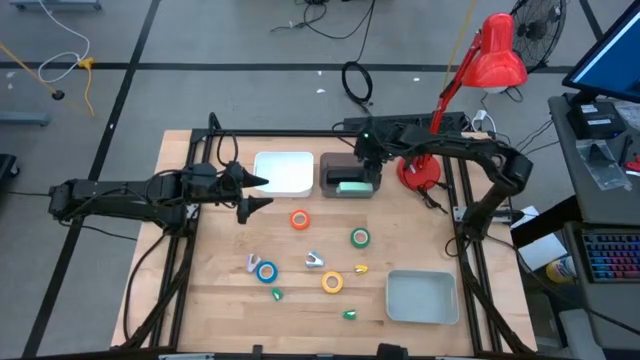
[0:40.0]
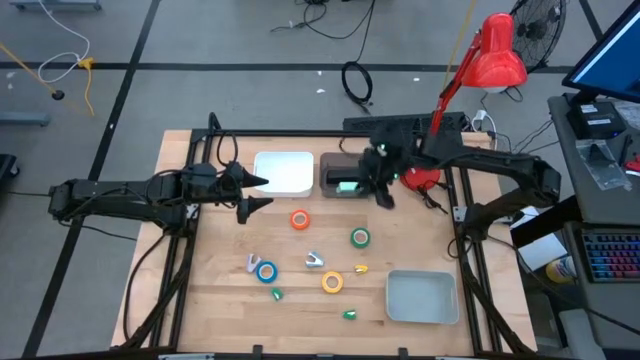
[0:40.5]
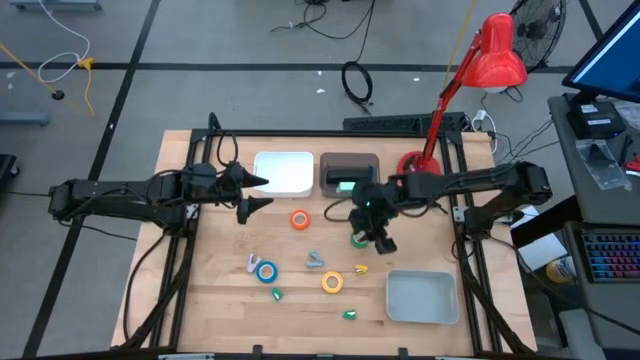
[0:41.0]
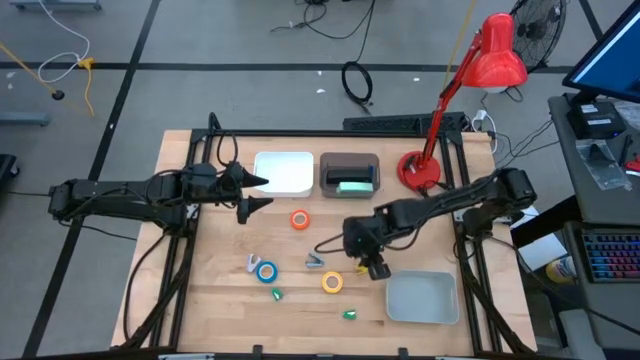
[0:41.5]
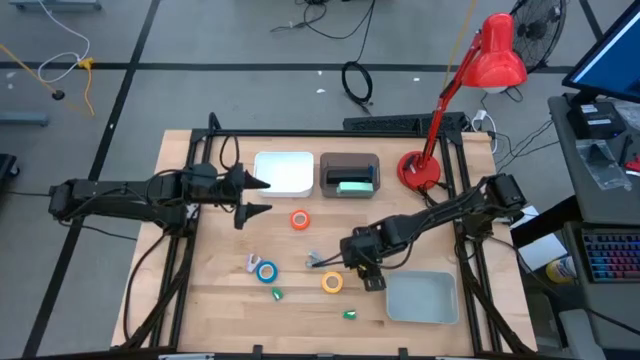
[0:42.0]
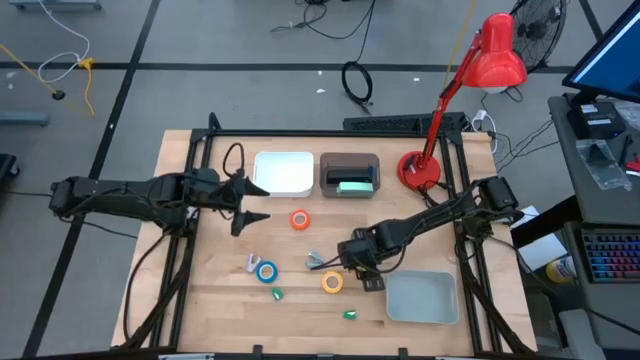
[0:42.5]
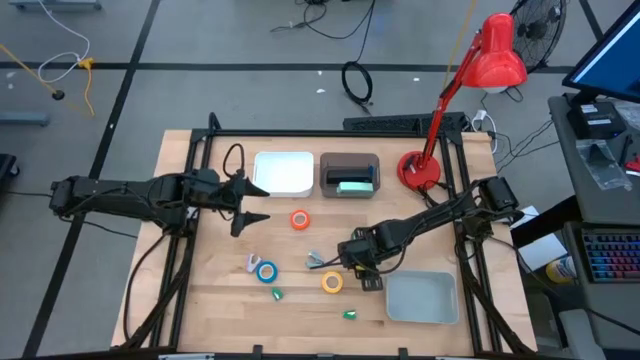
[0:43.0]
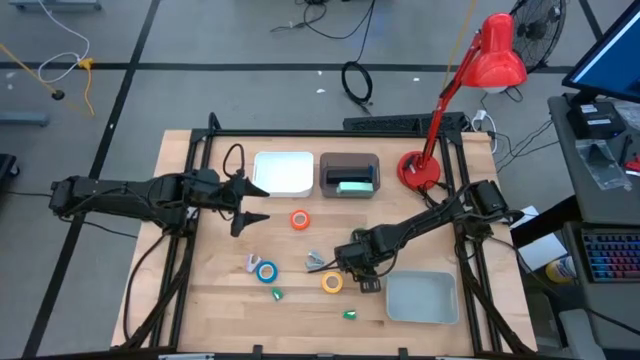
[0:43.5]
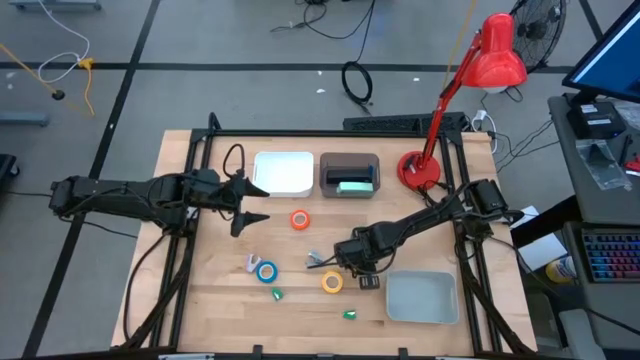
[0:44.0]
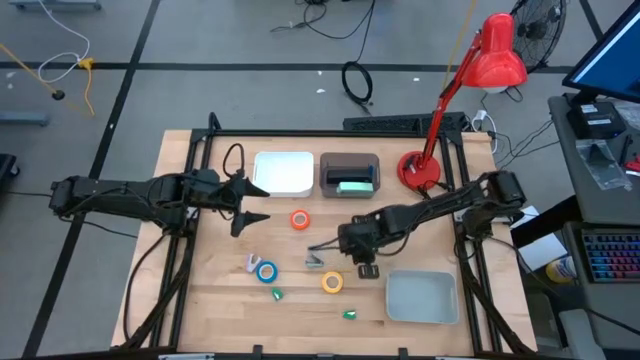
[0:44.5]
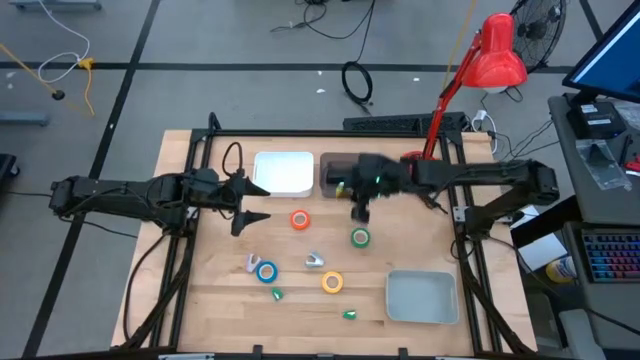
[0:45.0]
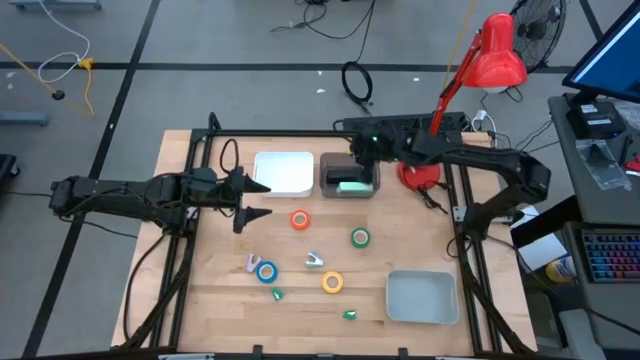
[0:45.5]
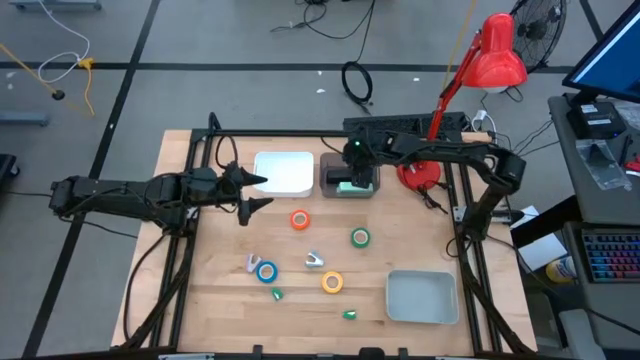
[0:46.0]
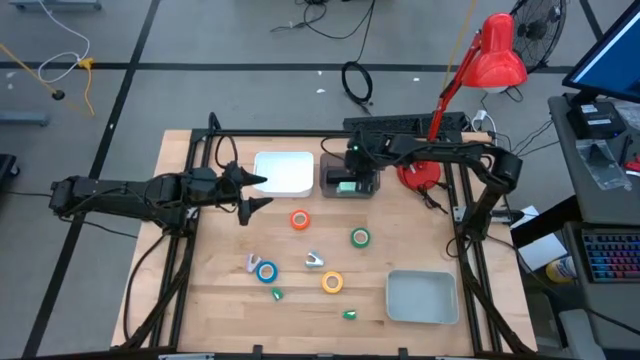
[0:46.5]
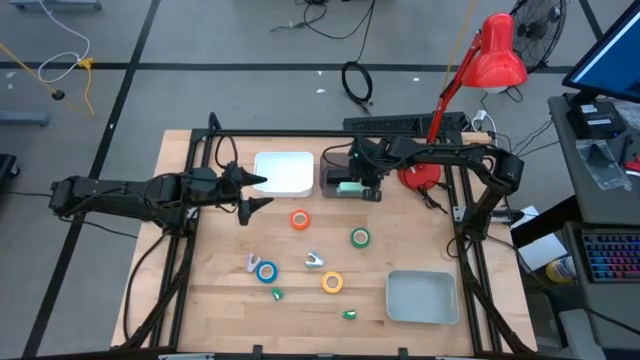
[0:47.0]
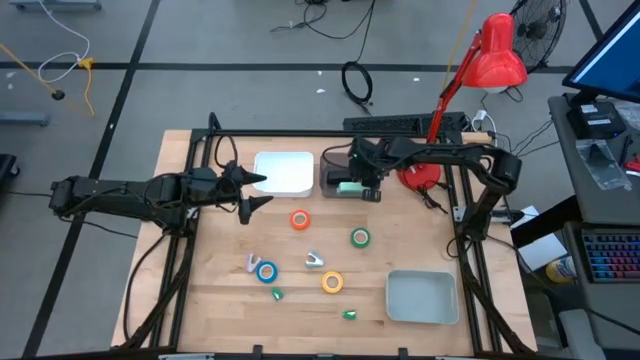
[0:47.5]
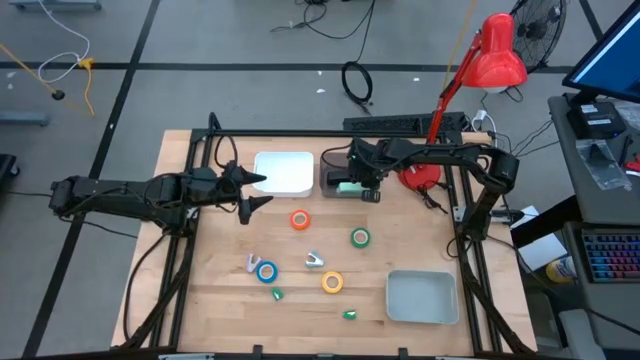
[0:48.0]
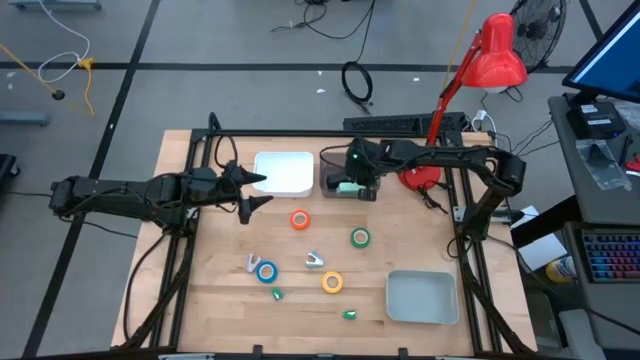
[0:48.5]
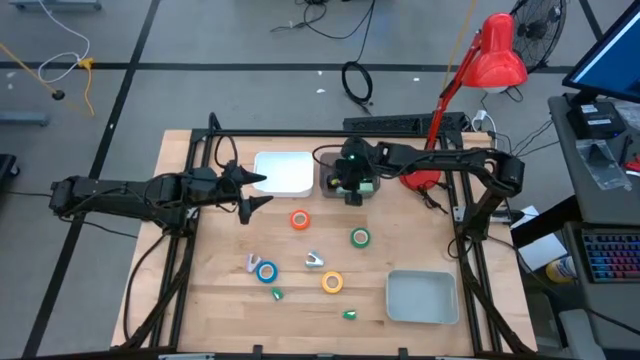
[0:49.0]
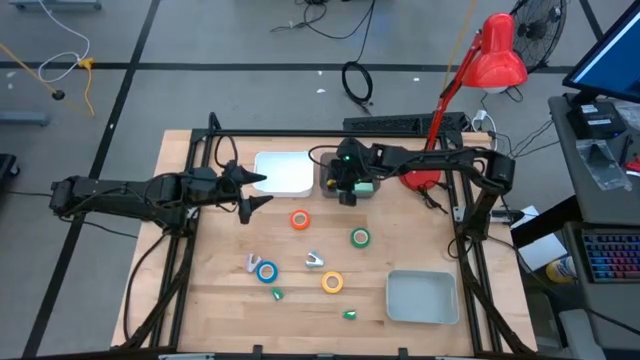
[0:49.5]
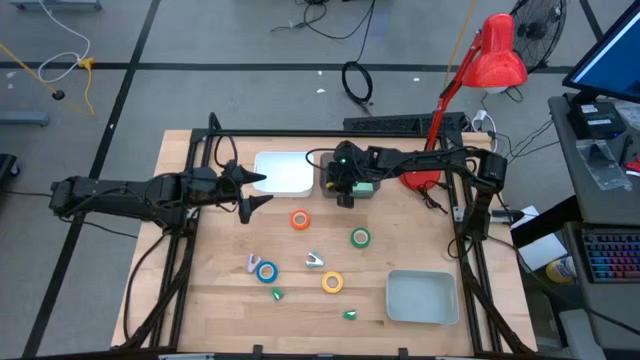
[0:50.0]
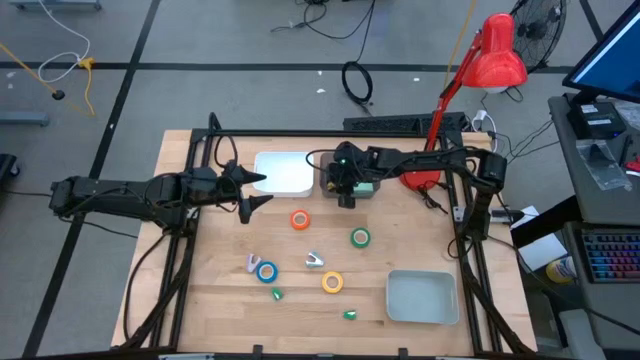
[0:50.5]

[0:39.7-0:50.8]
Task: Pick and place Stapler, Stapler remover, tape
Put the yellow stapler into the black bin

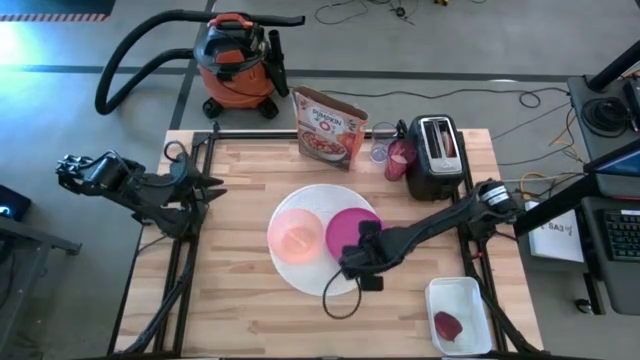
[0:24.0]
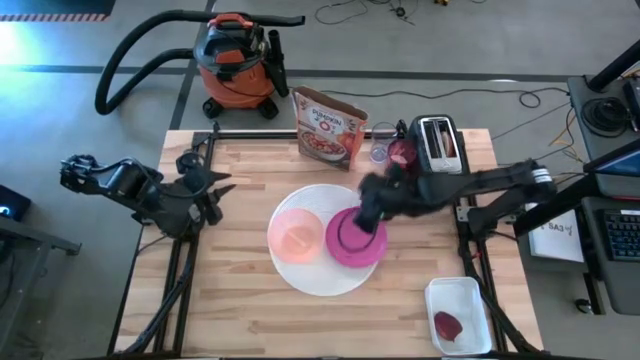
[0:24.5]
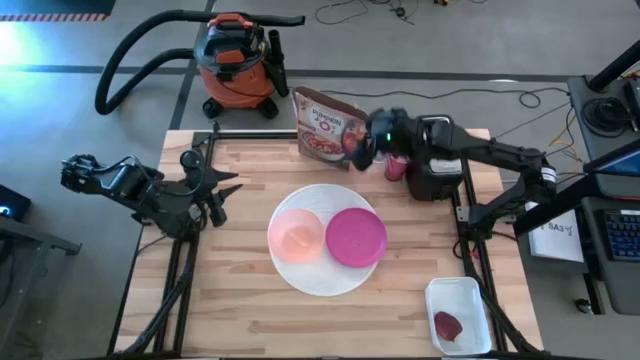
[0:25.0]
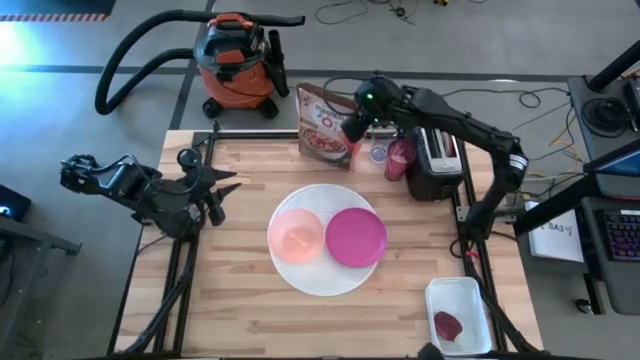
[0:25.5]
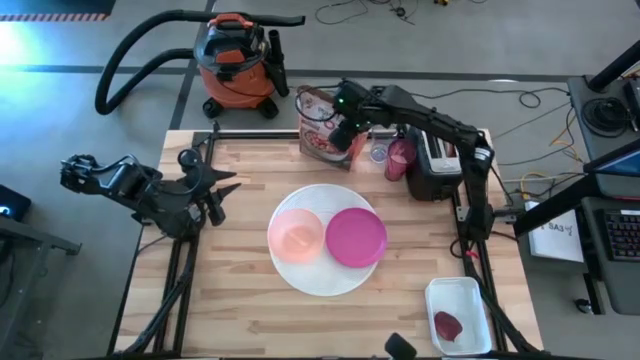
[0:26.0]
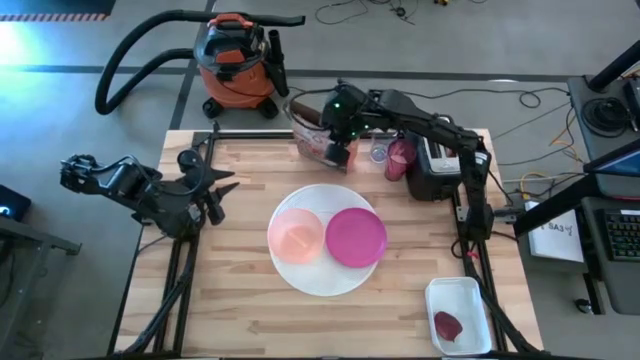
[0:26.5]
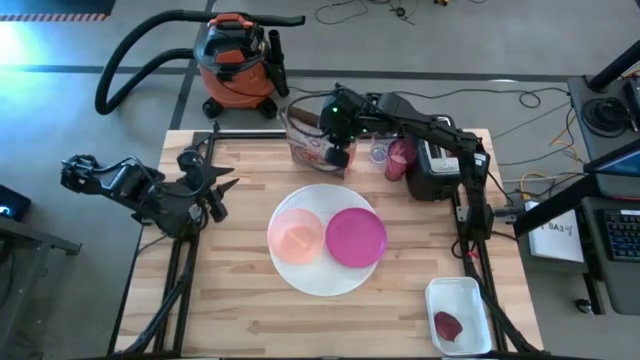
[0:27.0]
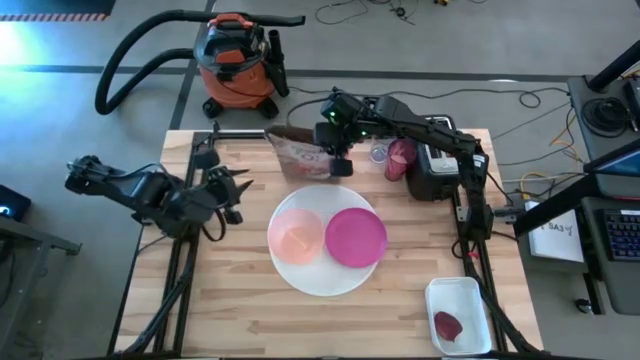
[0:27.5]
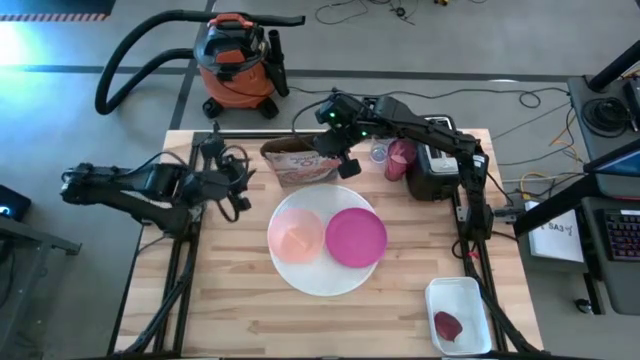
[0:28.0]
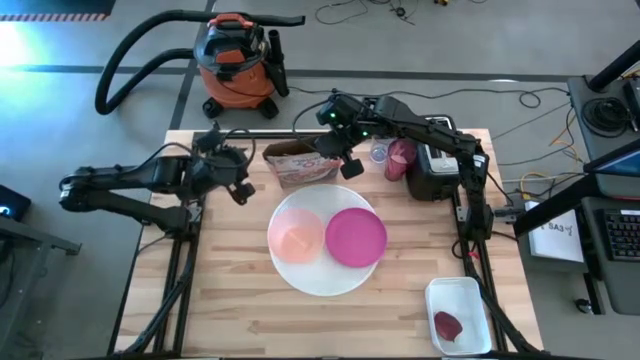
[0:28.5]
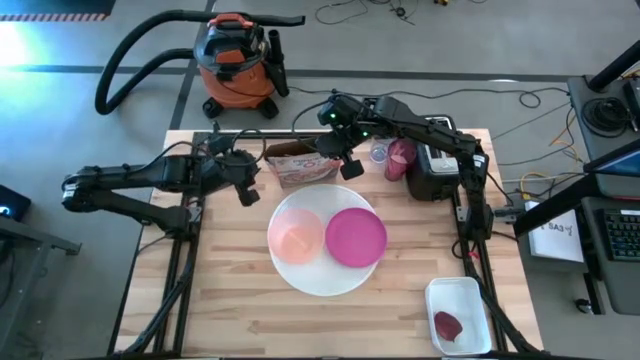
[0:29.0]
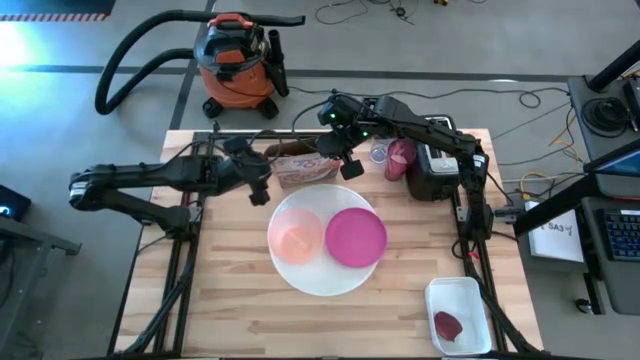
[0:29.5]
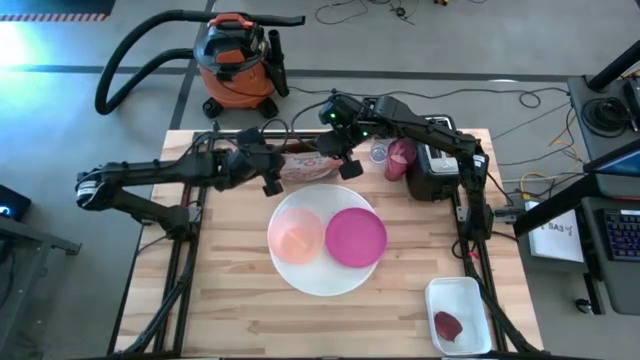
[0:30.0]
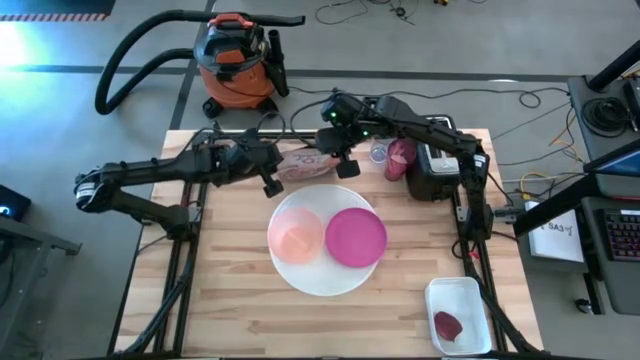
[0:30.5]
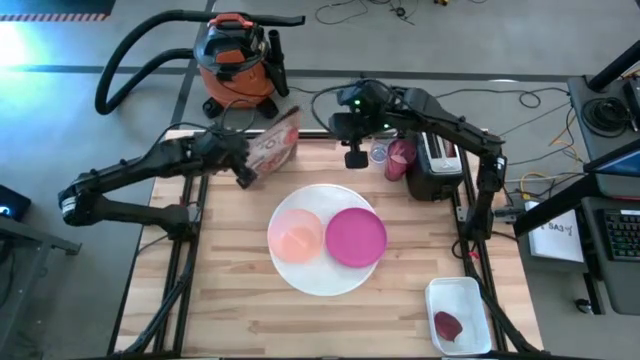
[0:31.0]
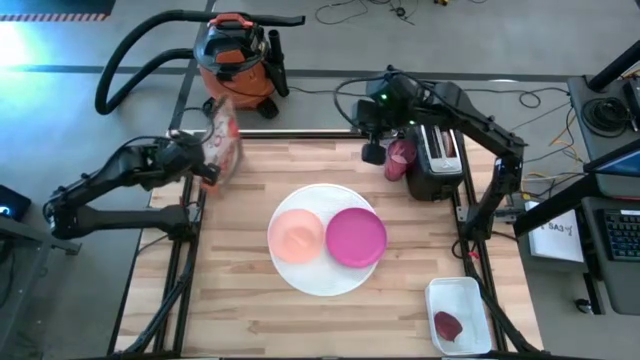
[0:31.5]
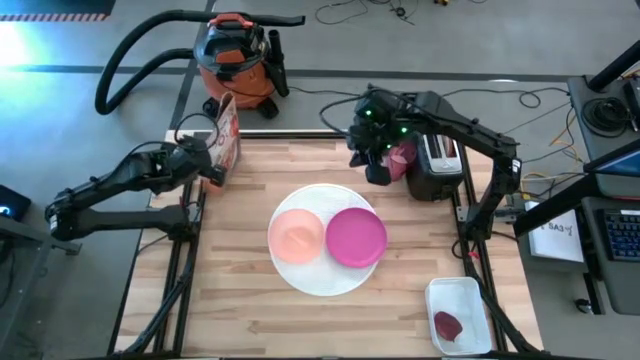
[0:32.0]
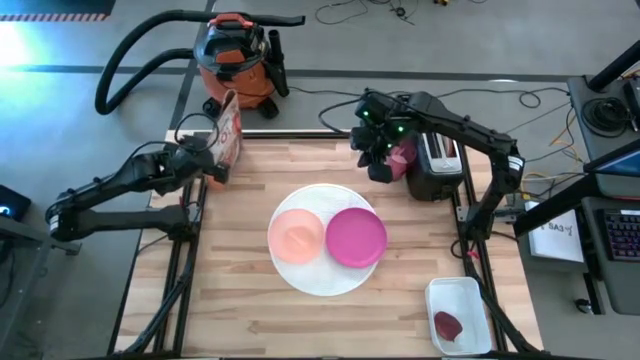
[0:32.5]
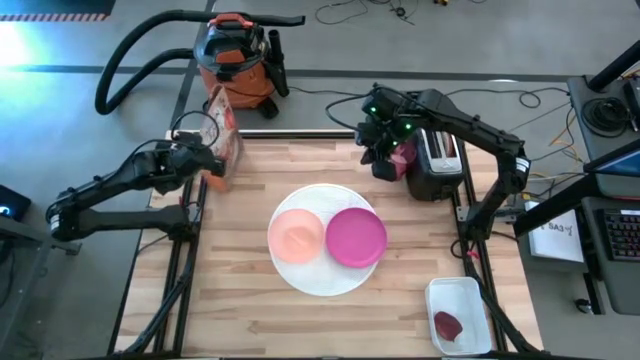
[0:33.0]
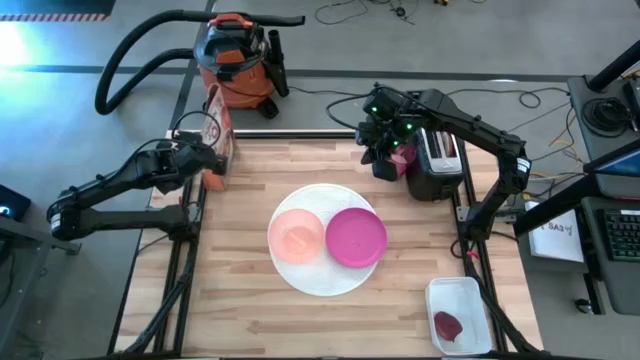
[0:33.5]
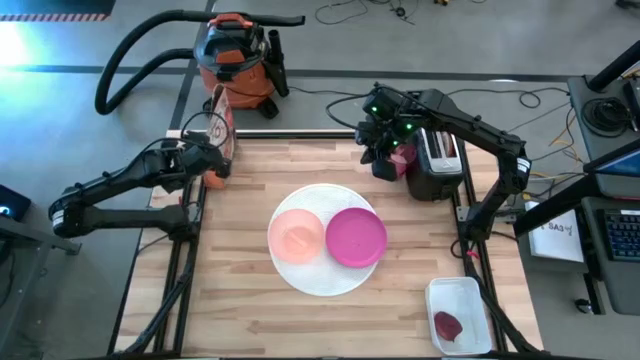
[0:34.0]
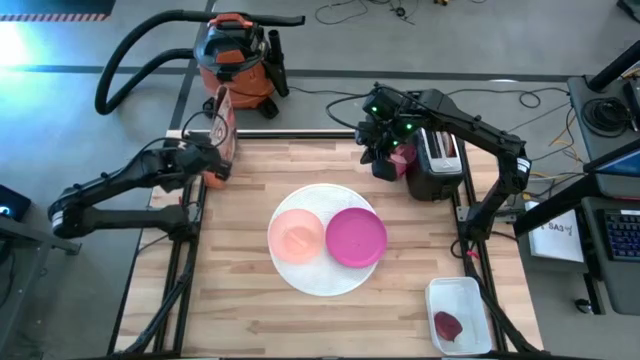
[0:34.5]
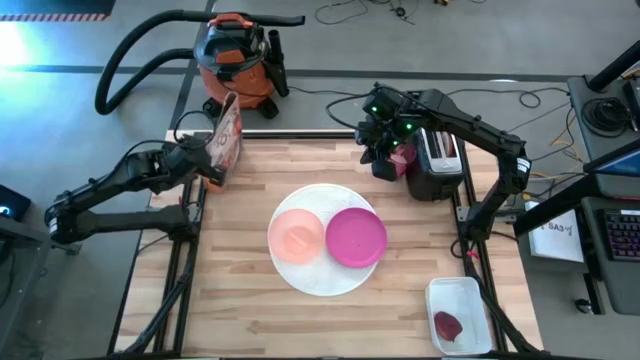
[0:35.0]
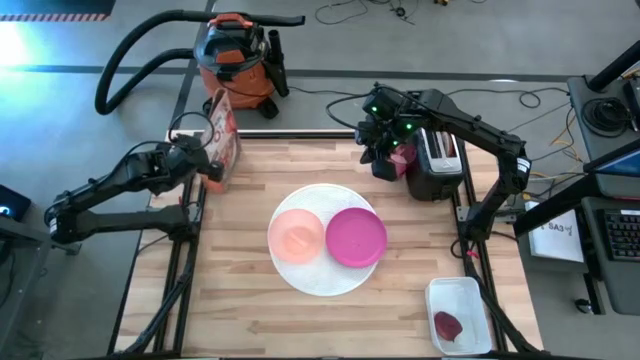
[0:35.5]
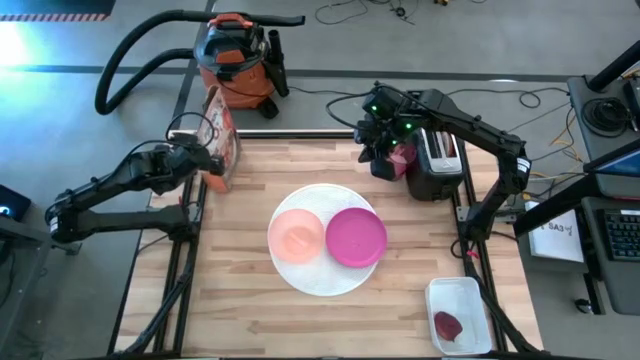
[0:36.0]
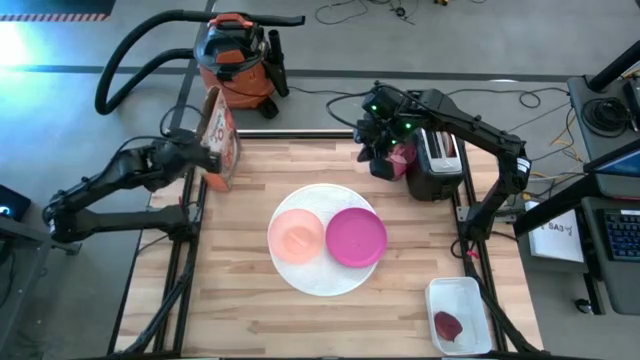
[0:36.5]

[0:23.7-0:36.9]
Task: Arrange a breakfast setting
Move the cereal box to the top left of the table
